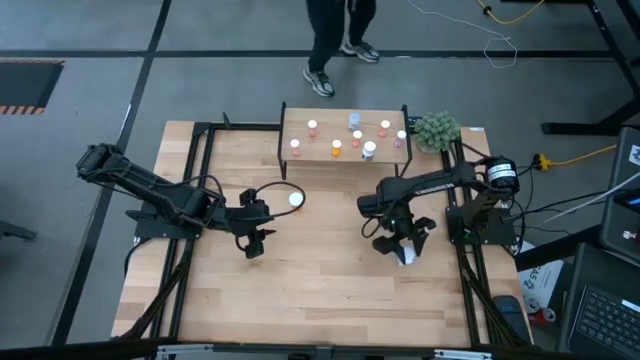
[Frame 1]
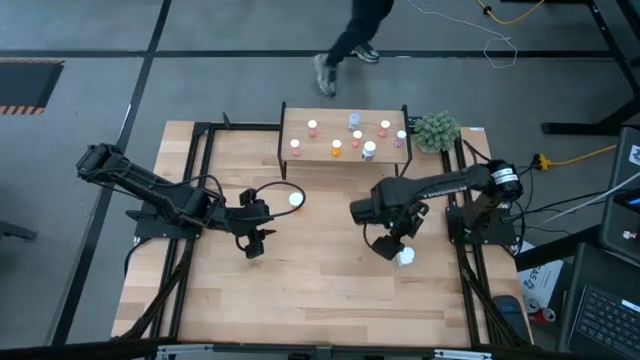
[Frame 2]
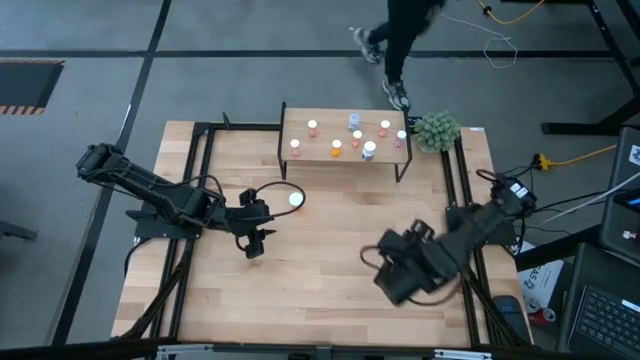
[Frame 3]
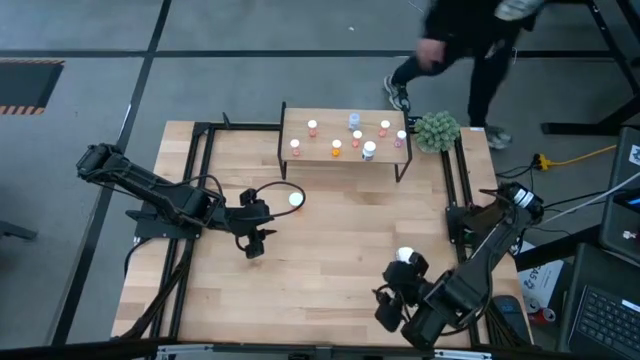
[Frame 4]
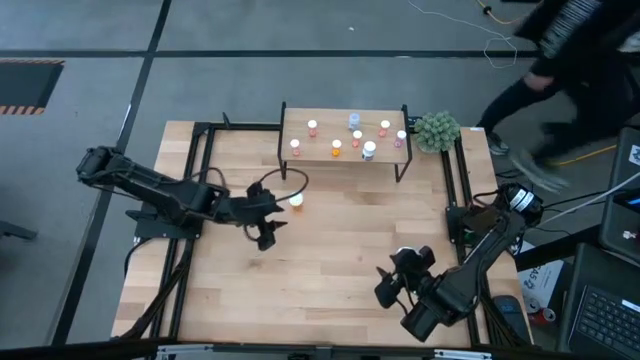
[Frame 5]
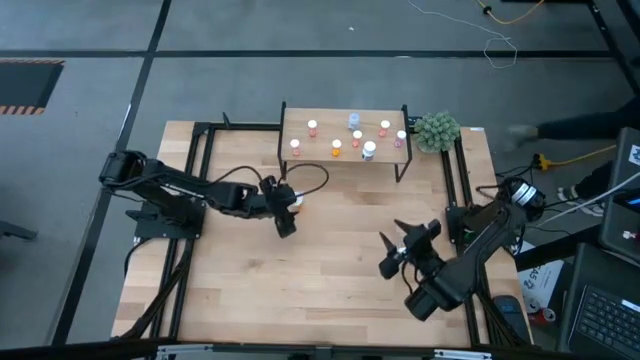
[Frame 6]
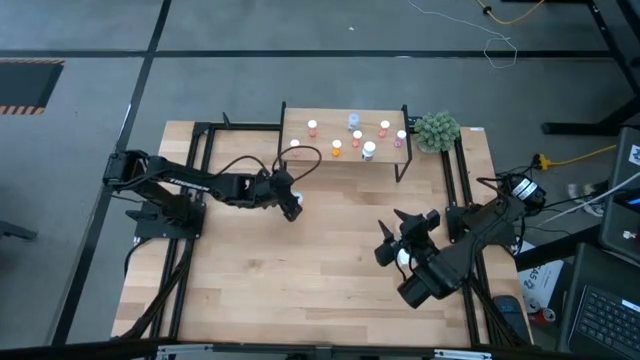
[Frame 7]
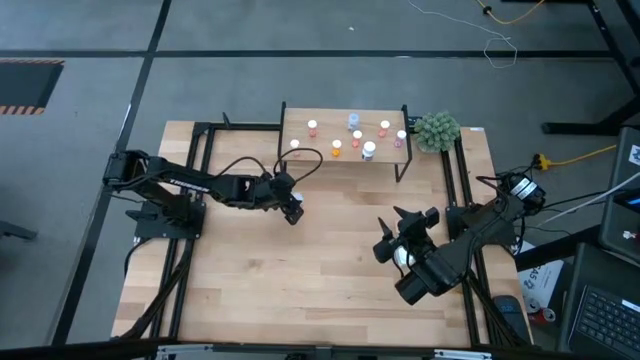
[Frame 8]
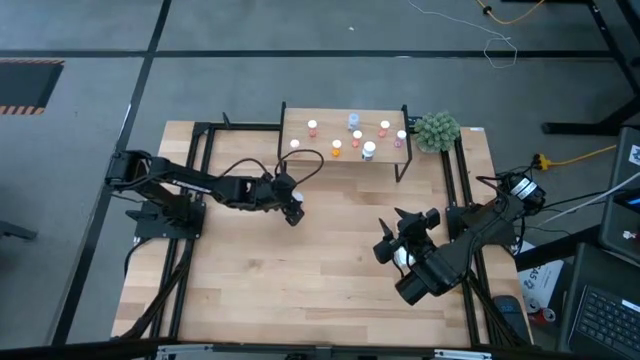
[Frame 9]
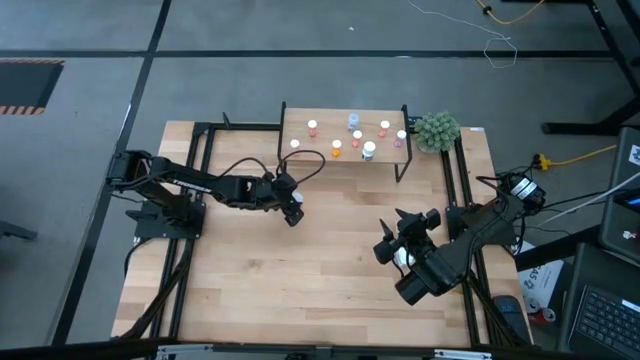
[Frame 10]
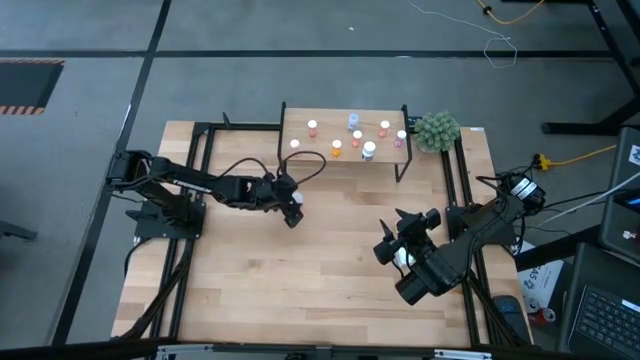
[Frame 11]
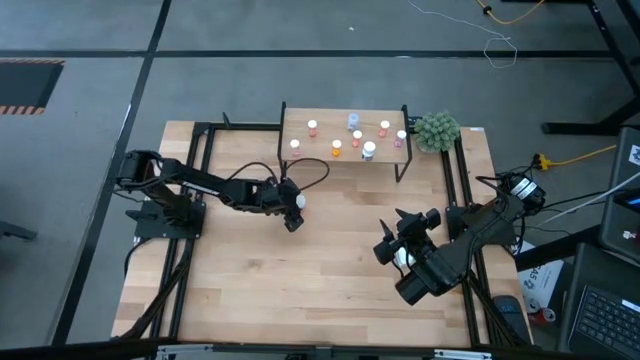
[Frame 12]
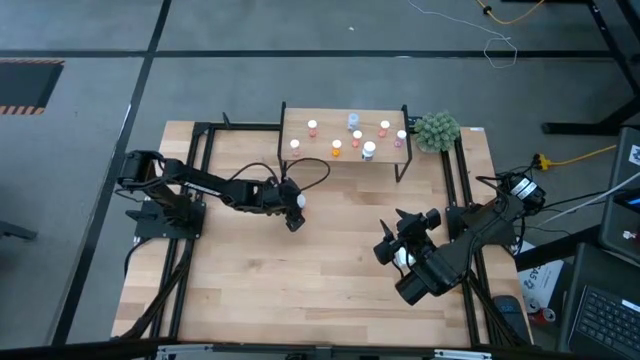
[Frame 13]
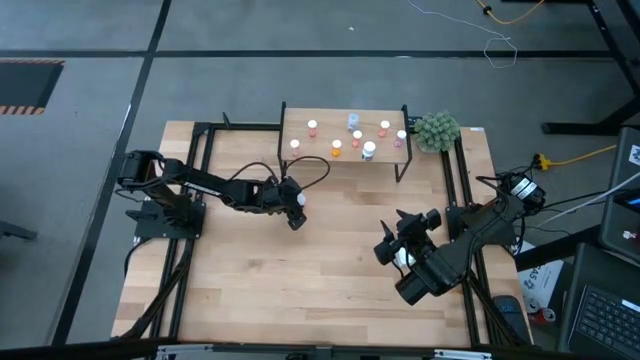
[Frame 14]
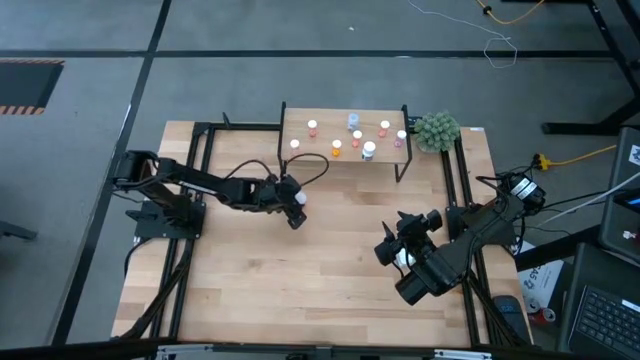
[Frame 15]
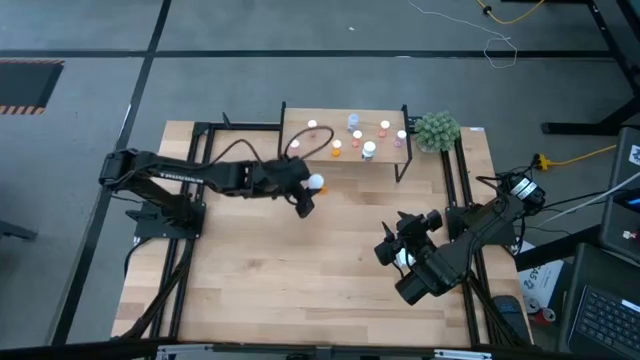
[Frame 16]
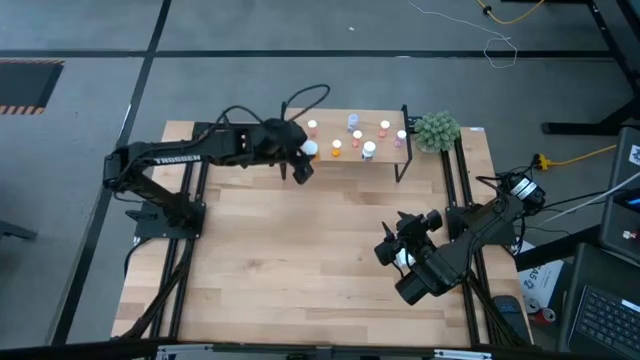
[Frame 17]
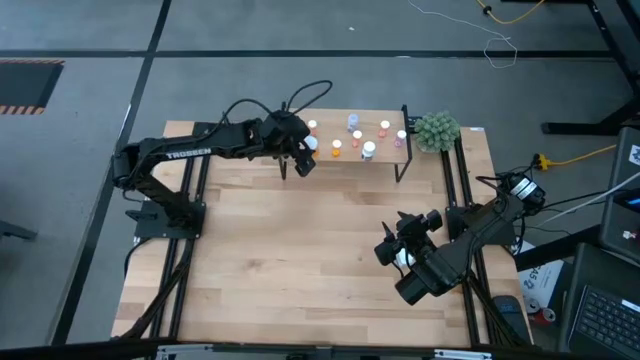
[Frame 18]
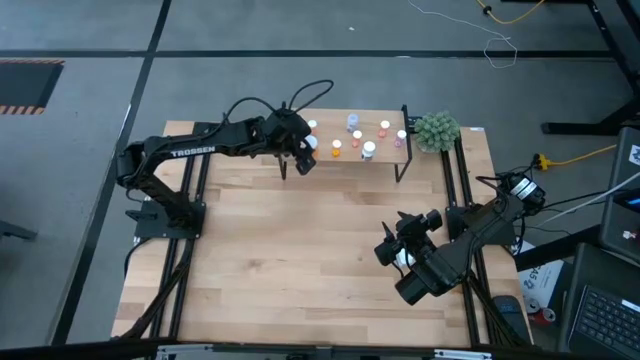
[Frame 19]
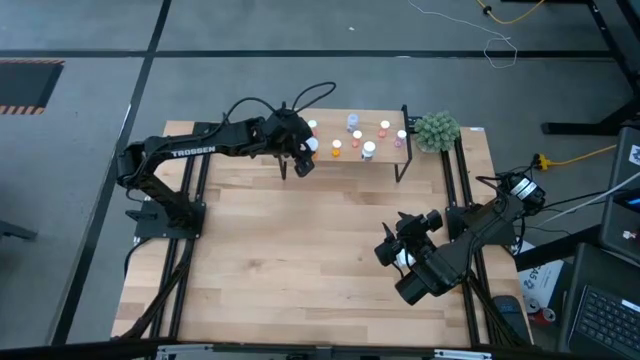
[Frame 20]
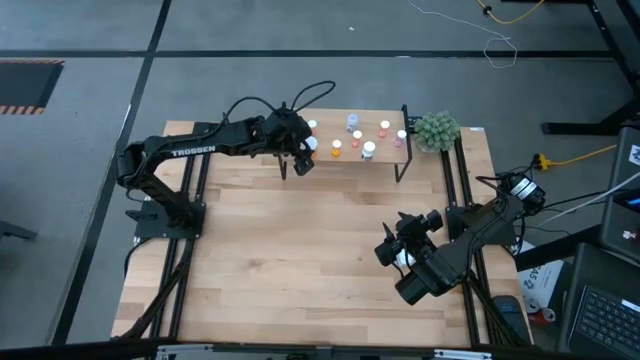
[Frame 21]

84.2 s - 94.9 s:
Task: Pick and place medicine bottles onto shelf by color
Put the big yellow pill bottle on the shelf

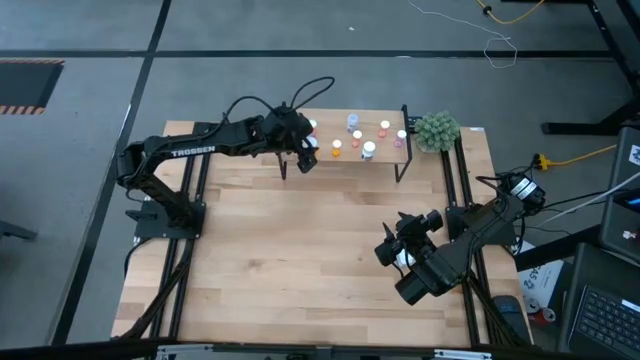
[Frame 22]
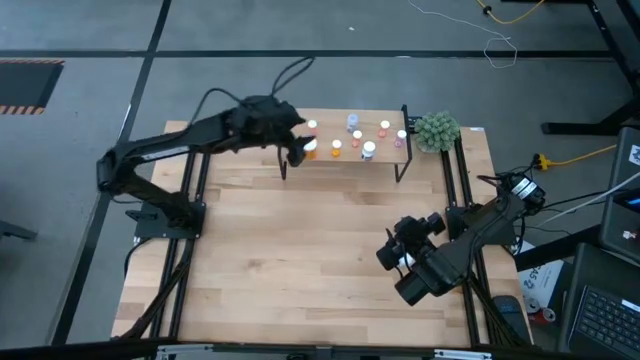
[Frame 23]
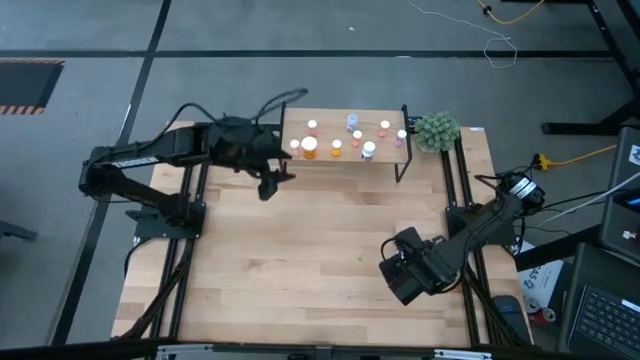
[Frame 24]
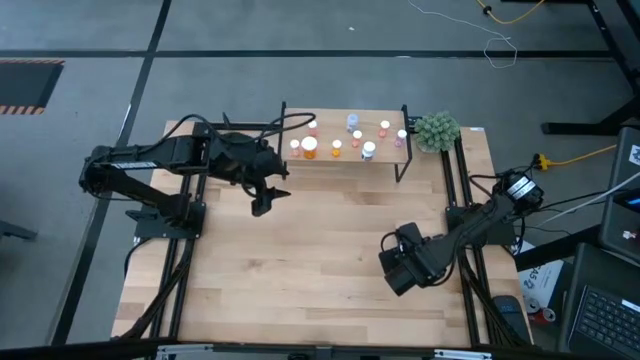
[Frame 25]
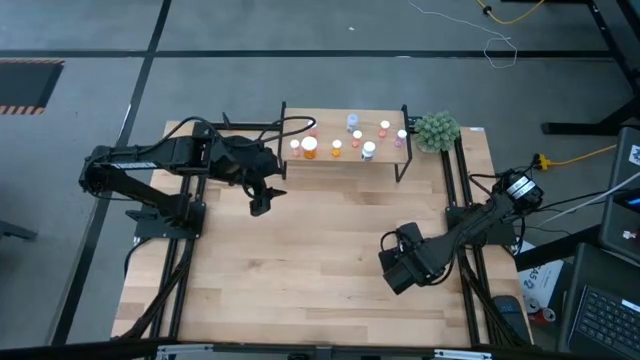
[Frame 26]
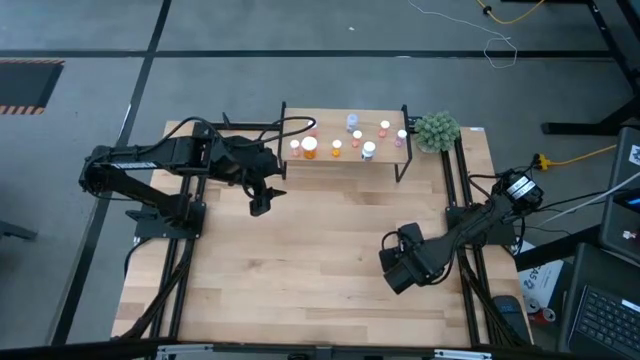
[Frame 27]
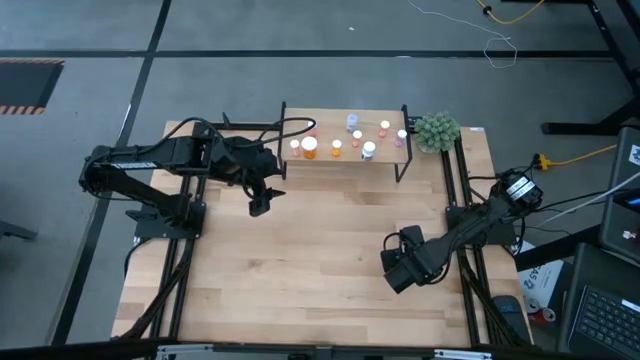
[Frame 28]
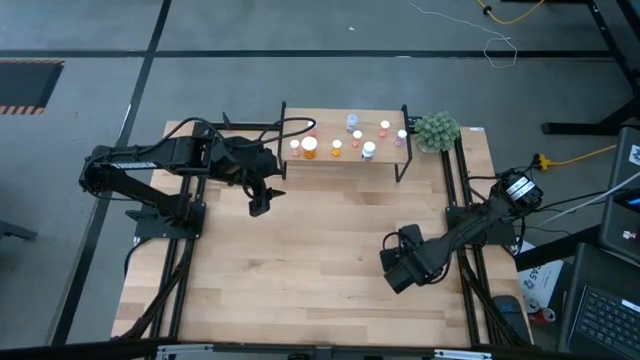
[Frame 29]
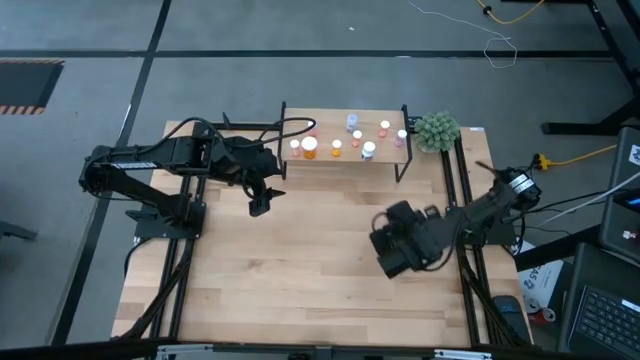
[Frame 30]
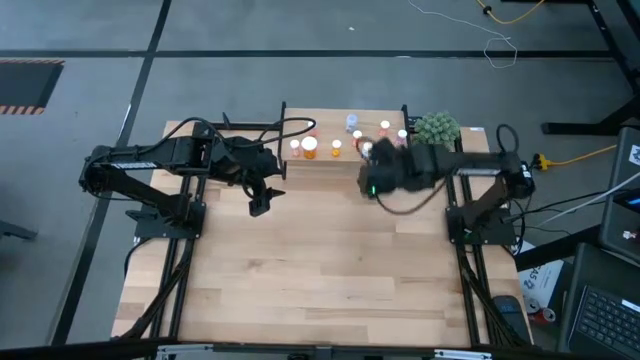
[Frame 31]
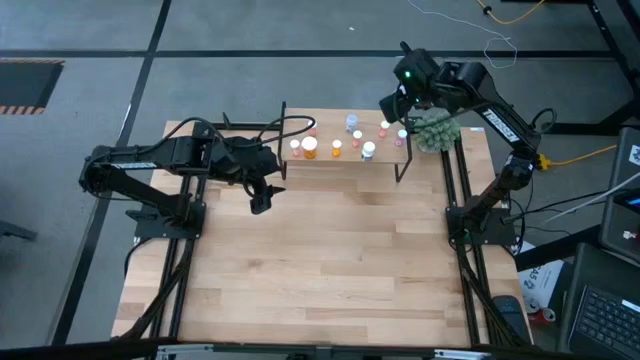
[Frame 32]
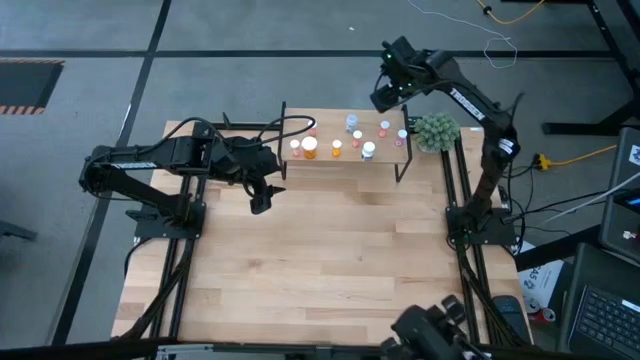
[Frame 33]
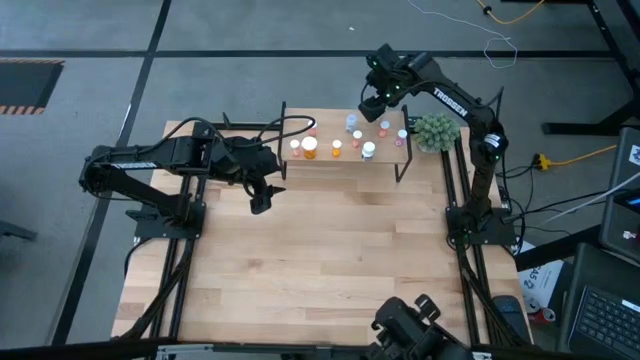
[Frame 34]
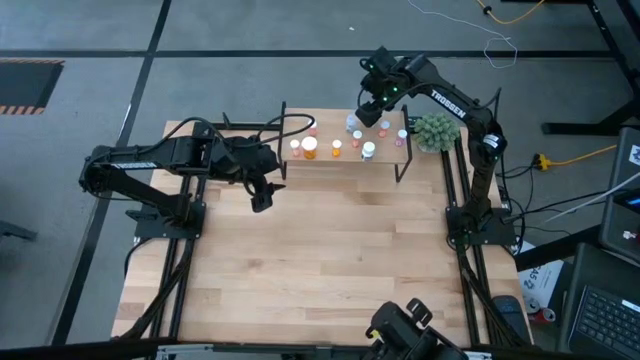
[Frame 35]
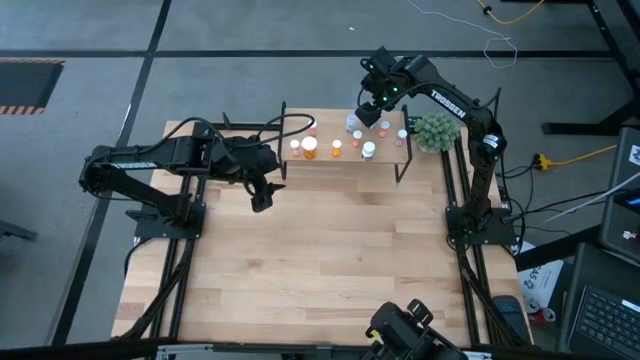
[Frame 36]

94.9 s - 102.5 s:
Put the big white pill bottle on the shelf

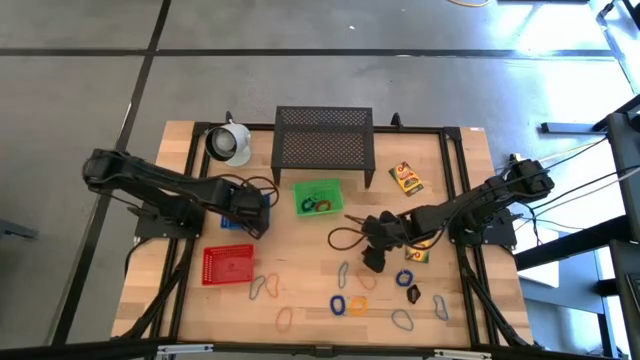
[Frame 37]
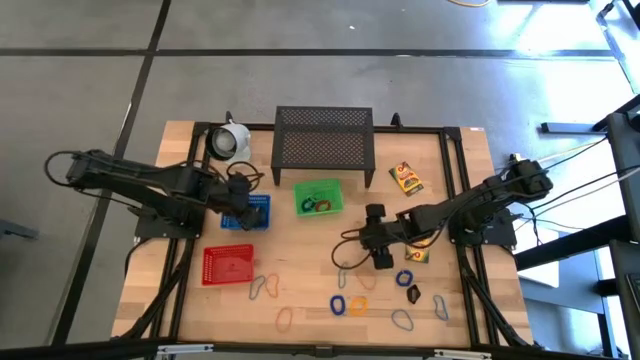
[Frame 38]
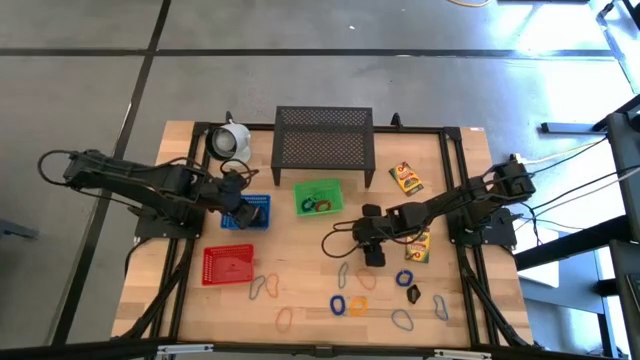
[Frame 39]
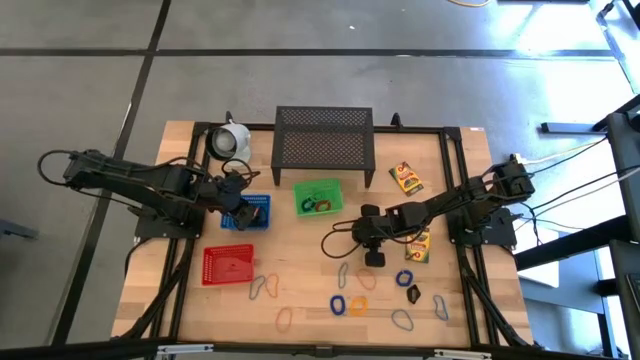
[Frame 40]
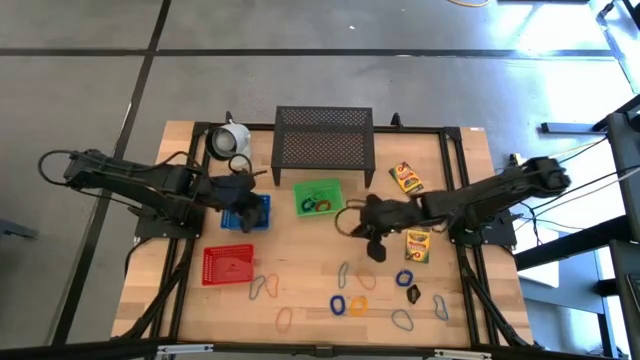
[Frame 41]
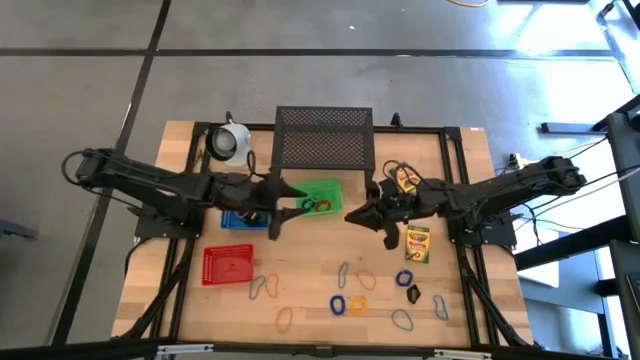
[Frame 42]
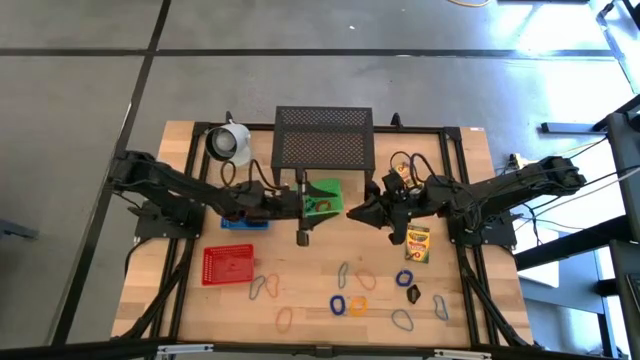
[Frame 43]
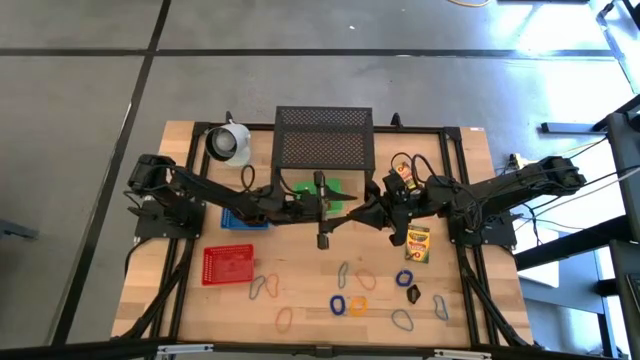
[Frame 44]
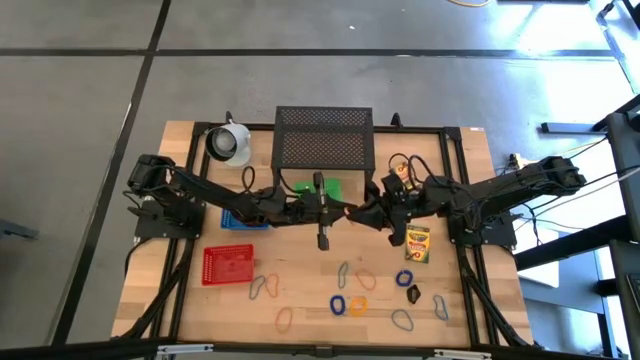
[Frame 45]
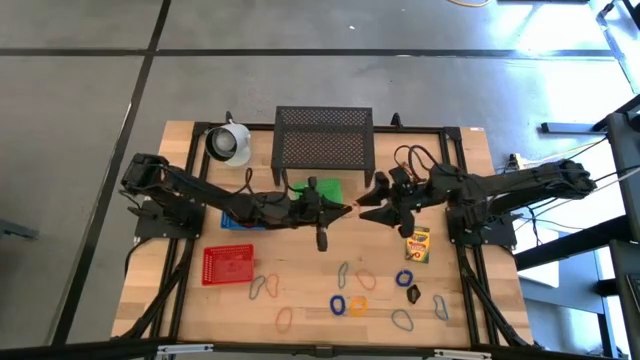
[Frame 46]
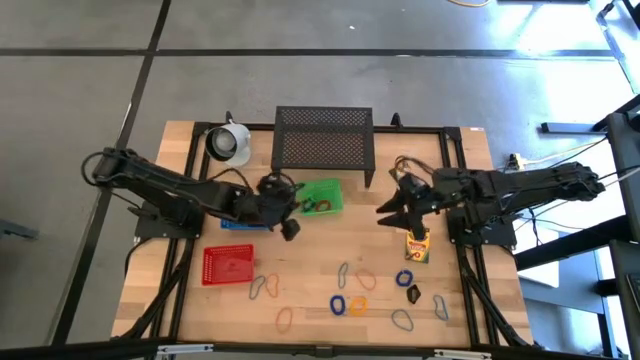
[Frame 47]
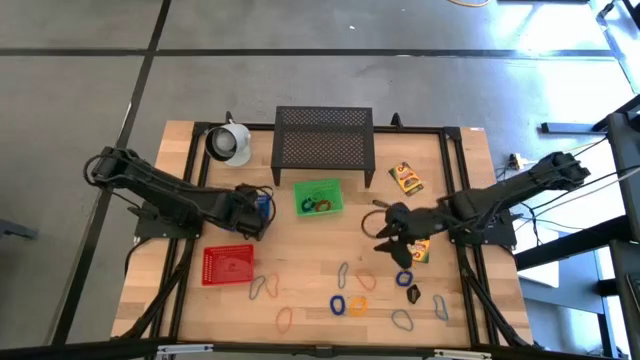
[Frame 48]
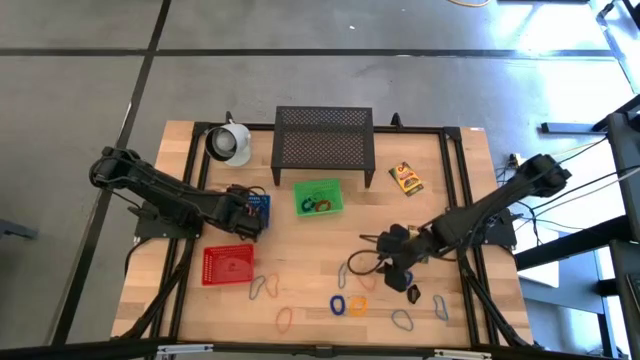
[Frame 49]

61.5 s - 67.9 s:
Task: Pick & Place Office Desk Supplies
Put the orange rubber band into the blue bin
